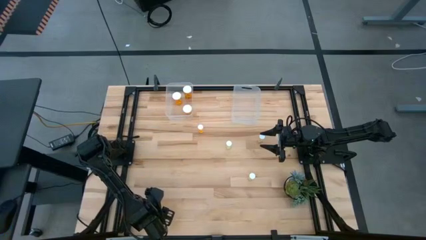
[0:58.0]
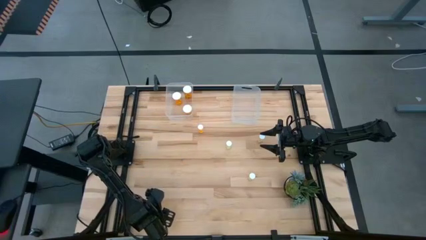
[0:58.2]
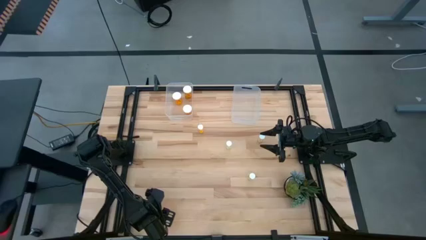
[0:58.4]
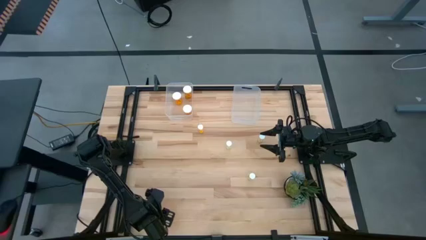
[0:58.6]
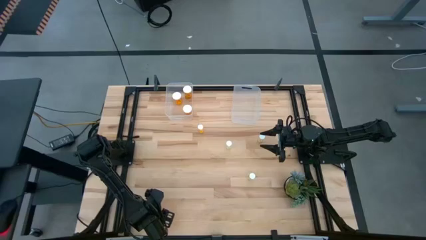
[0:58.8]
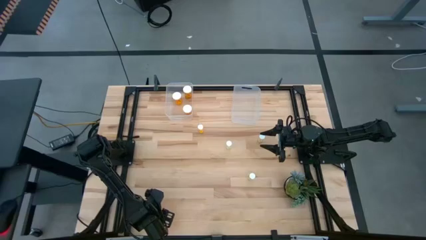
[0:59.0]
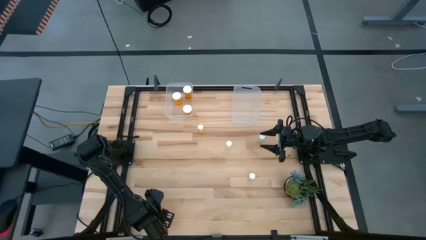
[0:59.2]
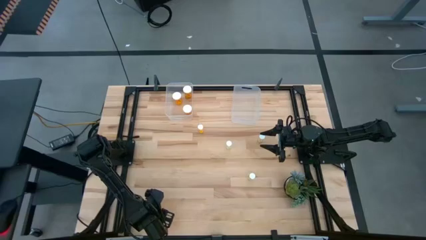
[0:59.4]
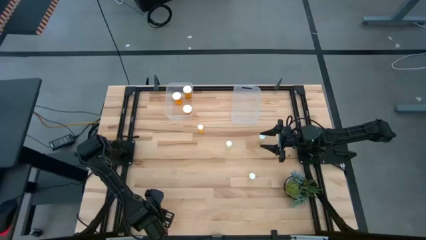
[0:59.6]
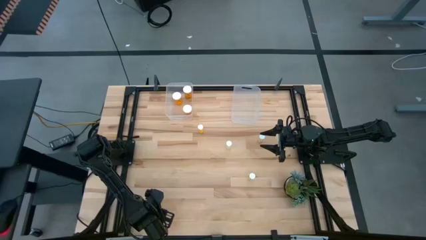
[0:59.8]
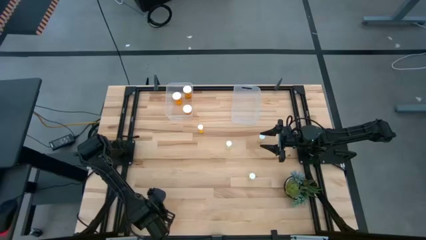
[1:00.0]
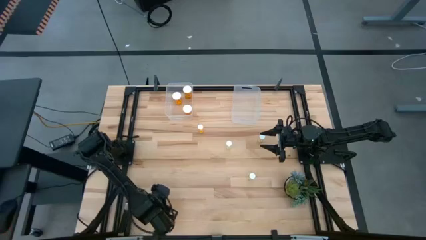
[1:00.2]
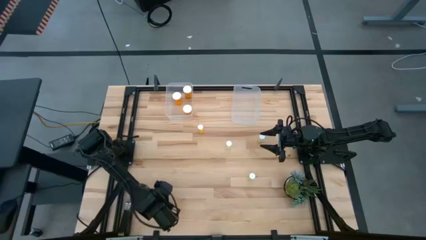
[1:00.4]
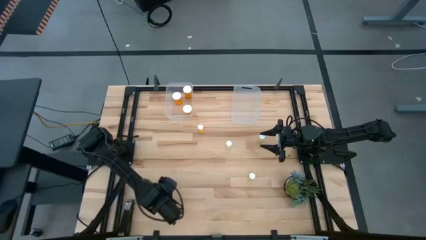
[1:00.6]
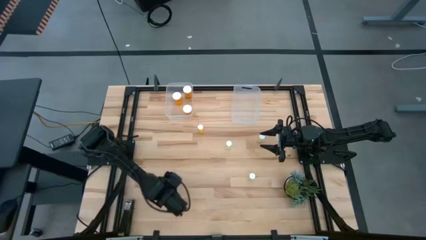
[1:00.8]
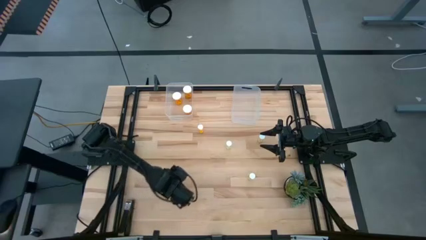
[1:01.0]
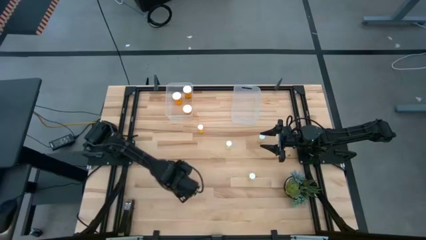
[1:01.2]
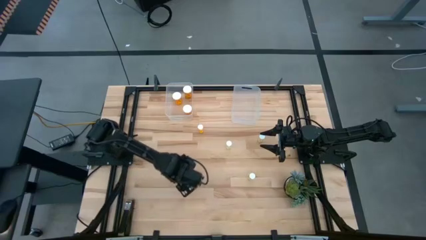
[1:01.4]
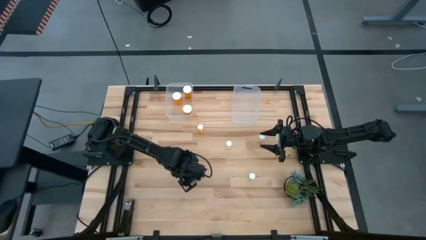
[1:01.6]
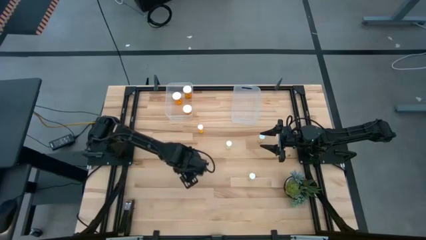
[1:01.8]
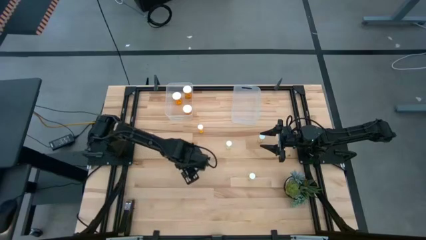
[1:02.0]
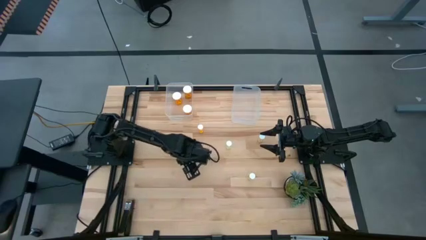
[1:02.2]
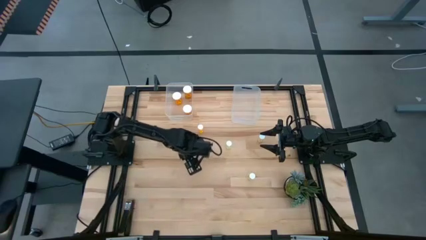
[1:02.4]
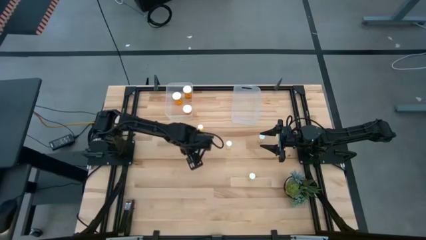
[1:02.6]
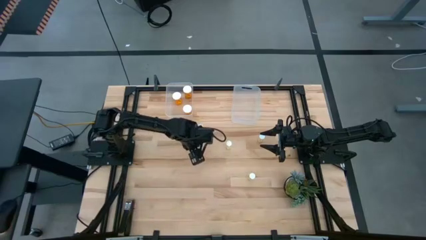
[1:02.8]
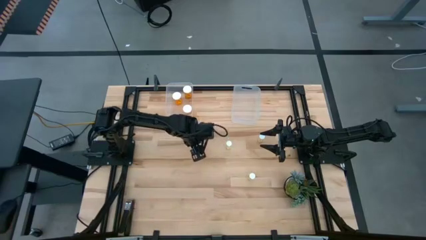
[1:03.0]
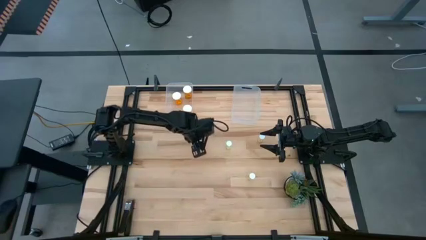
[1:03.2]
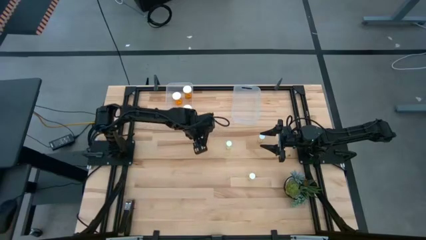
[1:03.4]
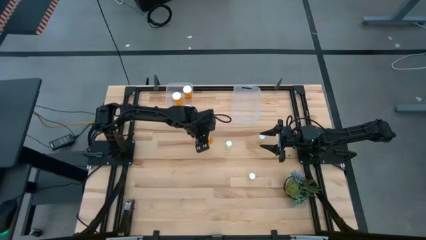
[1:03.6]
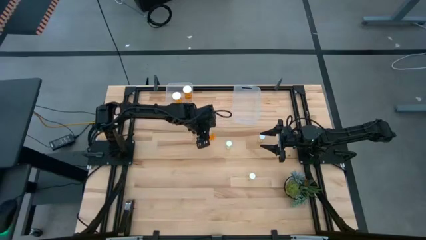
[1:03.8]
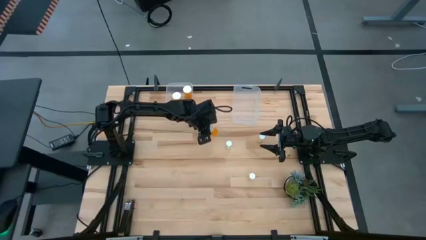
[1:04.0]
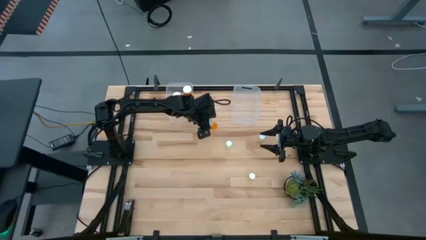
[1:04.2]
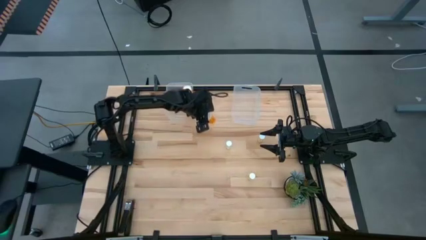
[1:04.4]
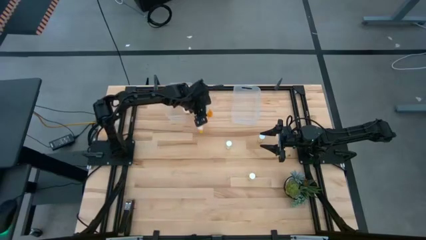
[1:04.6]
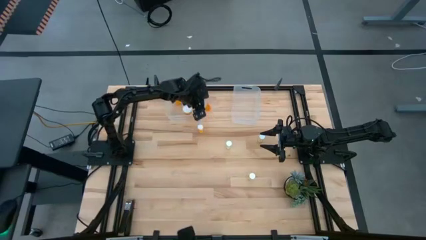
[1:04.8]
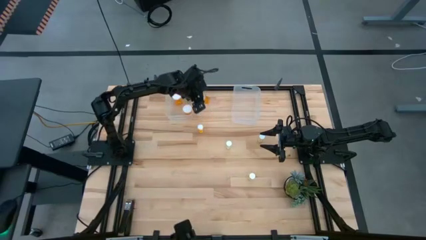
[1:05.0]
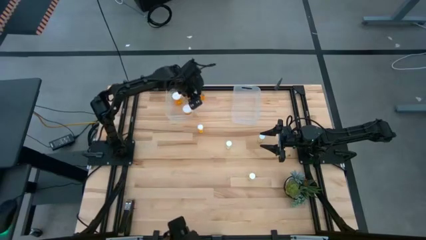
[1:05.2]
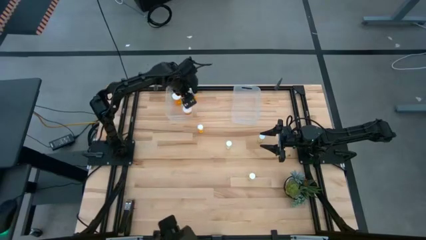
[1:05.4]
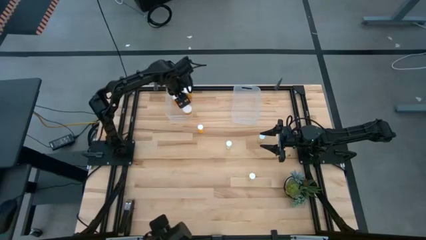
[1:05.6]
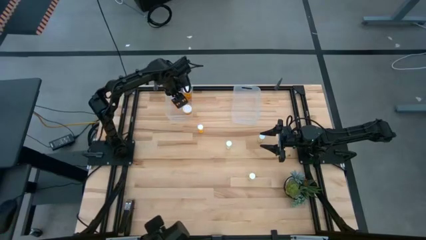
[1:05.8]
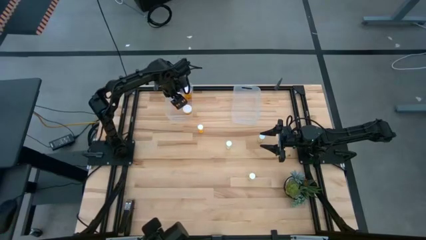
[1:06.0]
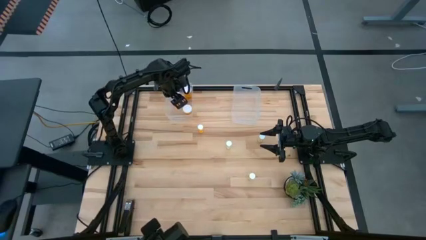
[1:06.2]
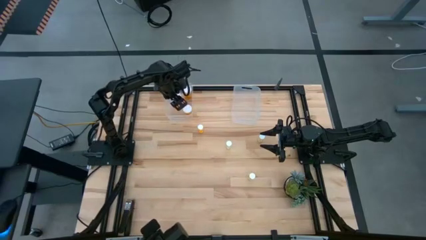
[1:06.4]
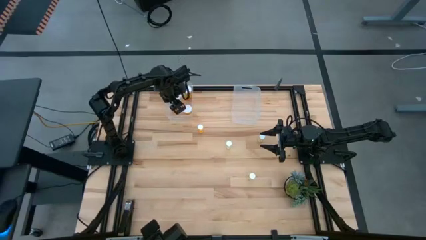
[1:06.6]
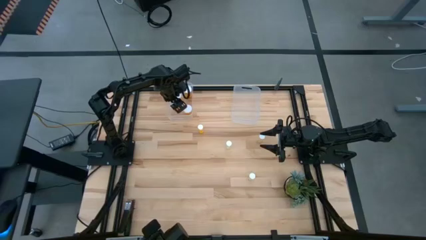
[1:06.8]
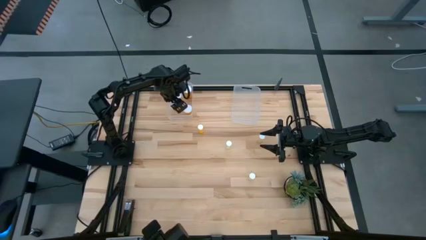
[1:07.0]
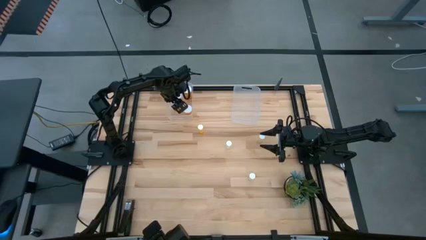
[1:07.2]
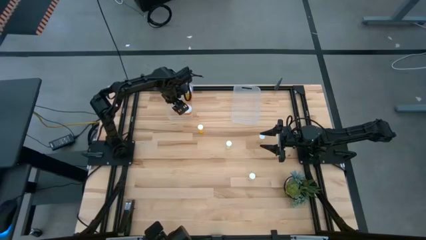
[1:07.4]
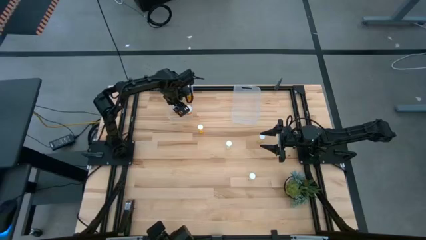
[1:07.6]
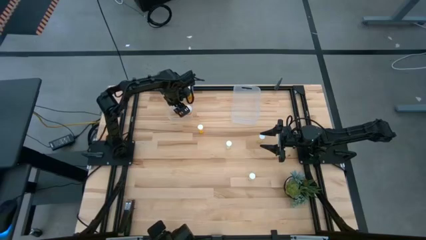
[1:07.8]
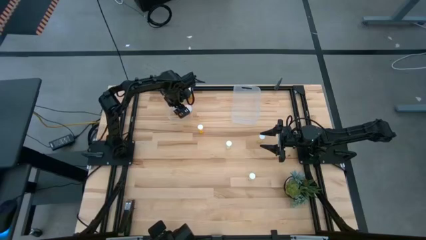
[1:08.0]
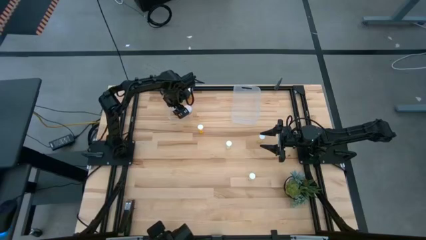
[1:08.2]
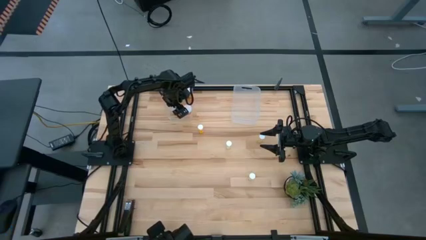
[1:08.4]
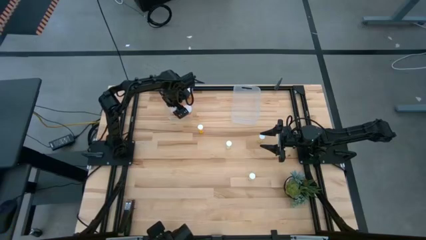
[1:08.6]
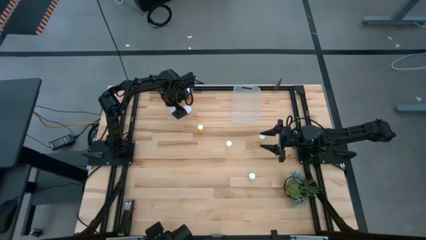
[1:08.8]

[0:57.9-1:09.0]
Task: Pick and place medicine bottles into bin by pill shape (circle, oval)
Put the large orange pill bottle into the left transparent bin

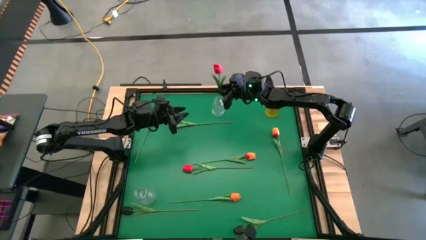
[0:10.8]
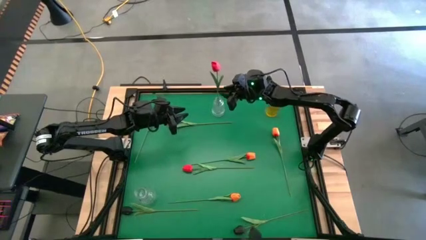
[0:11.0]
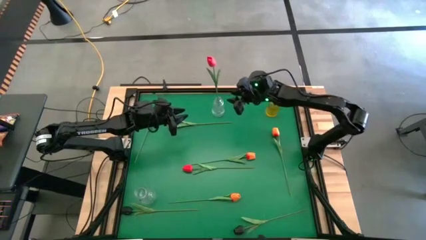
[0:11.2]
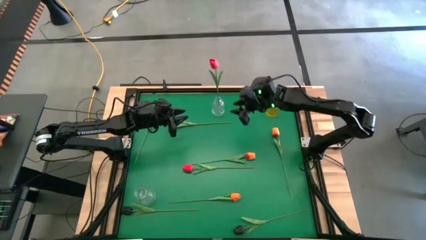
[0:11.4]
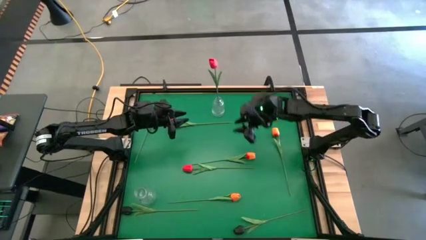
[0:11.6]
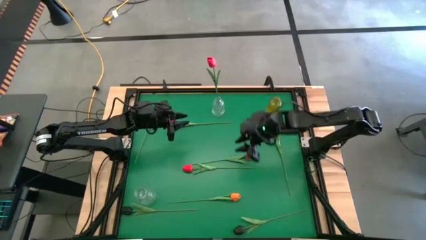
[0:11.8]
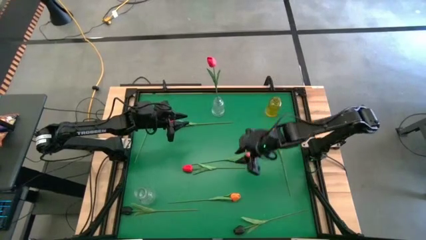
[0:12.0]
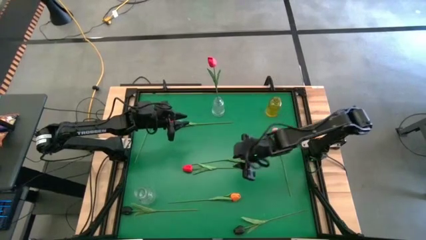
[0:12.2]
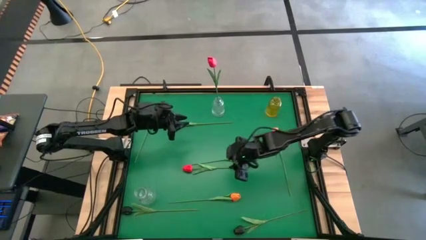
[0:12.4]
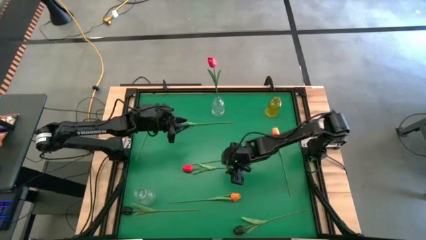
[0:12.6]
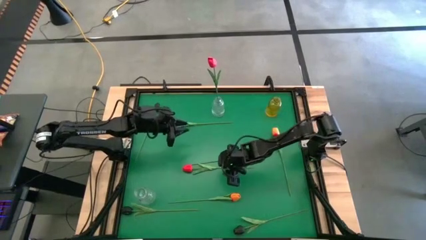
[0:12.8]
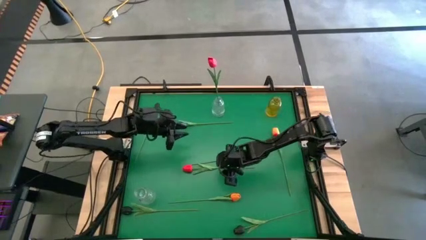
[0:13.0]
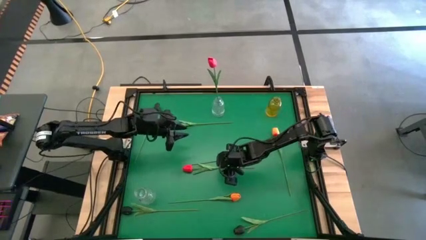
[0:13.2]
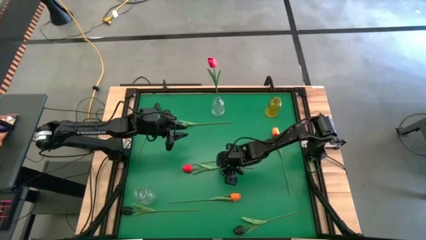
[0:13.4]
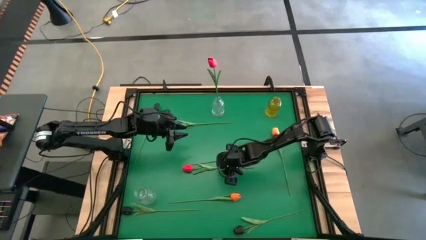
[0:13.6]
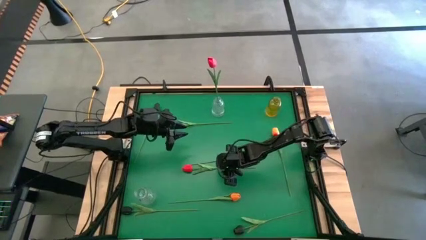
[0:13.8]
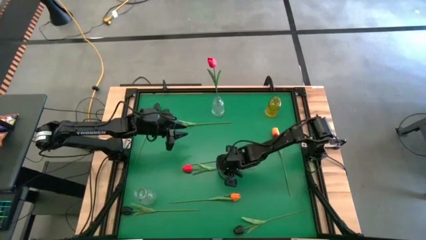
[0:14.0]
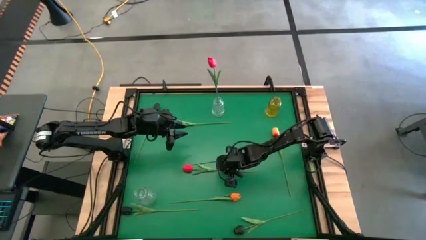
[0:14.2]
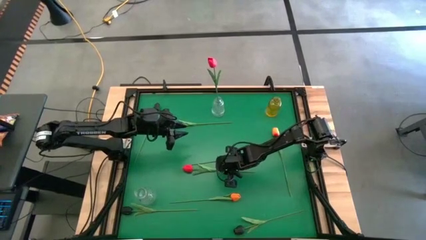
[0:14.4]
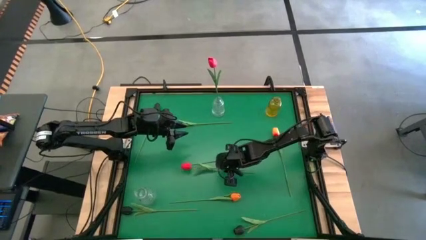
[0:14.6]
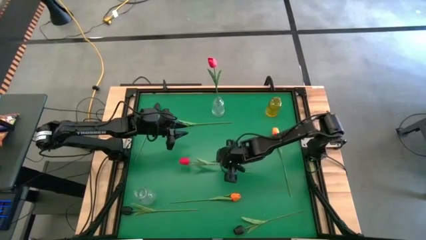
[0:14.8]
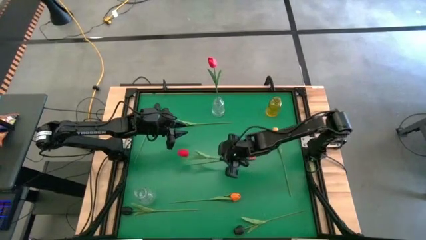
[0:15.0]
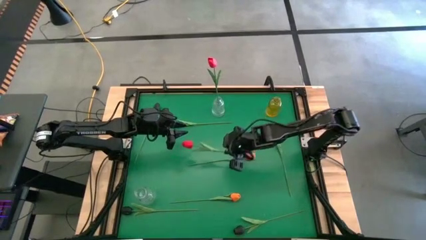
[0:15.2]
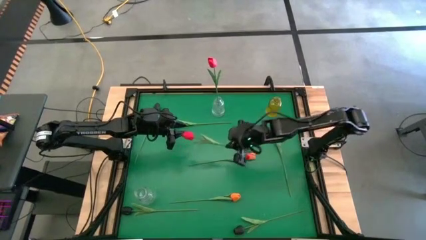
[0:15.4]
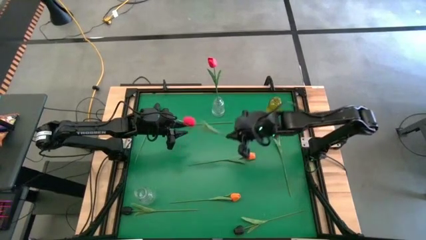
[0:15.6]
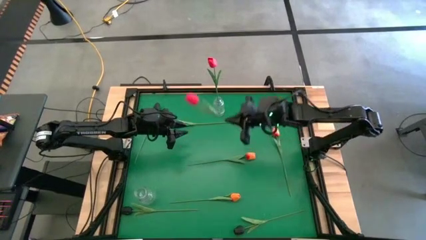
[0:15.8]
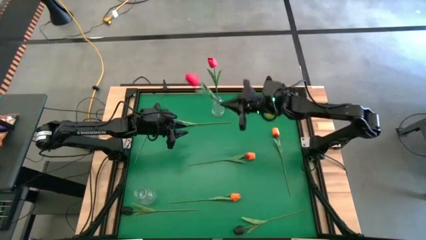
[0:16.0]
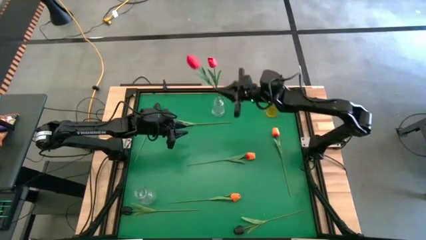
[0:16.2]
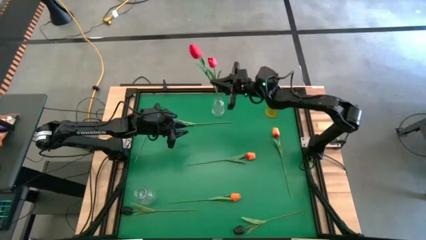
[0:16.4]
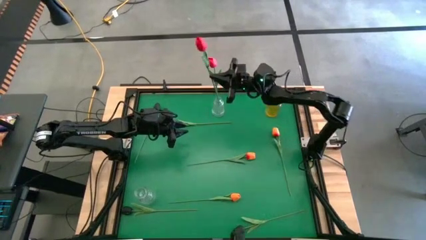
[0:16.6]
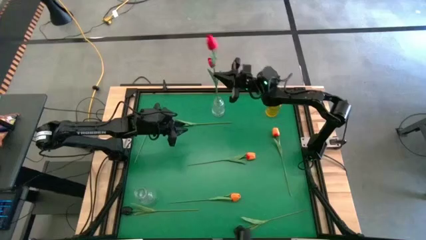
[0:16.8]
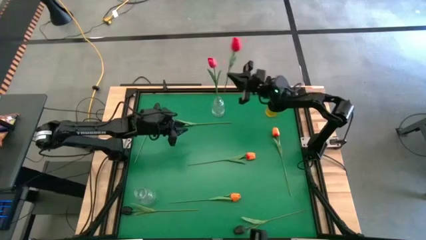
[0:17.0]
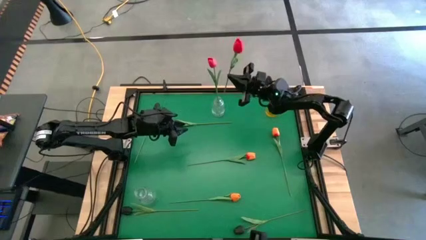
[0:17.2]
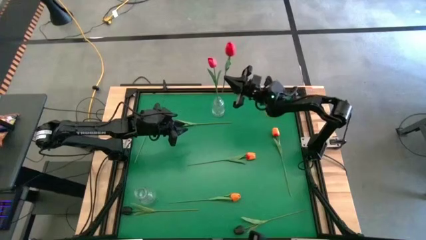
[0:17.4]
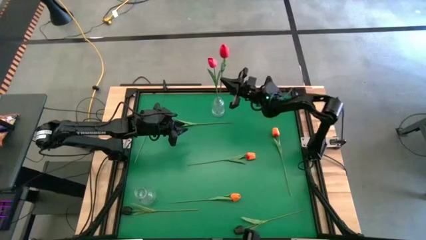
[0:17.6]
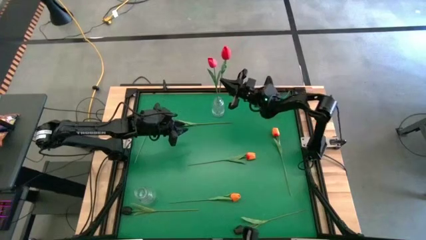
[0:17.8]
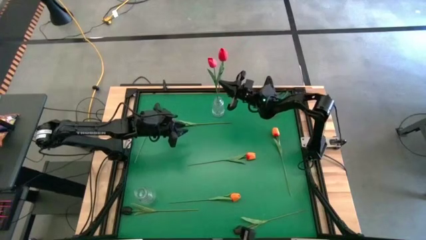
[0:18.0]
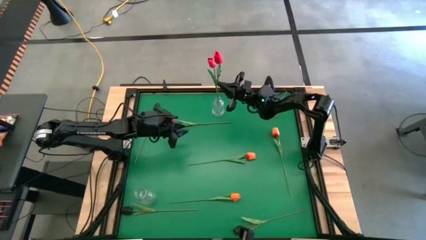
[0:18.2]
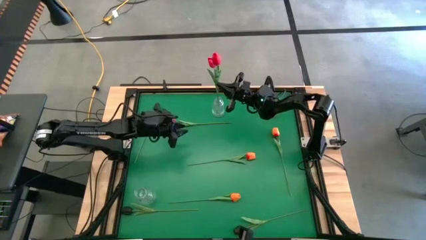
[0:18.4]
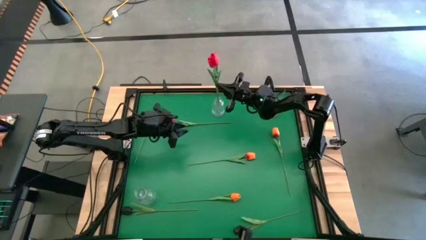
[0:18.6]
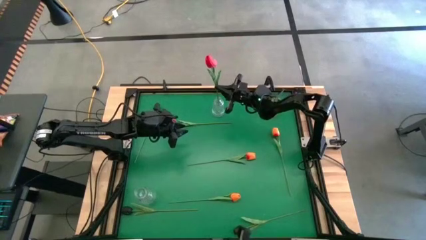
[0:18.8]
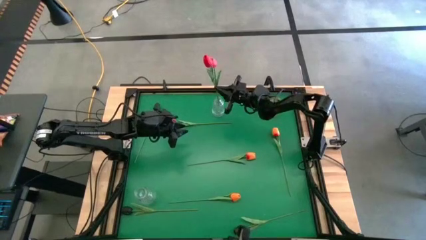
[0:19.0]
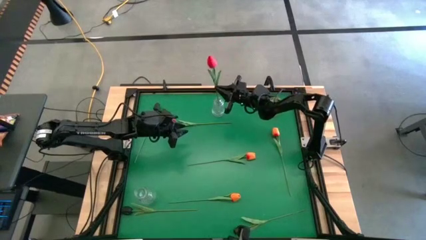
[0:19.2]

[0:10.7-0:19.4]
Task: Sort flowers into vase by color
Put the bottom red flower into the top transparent vase
